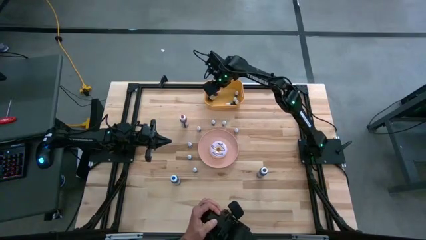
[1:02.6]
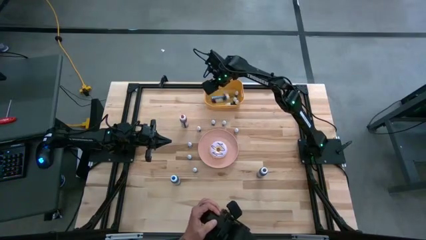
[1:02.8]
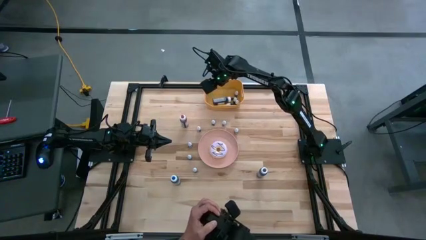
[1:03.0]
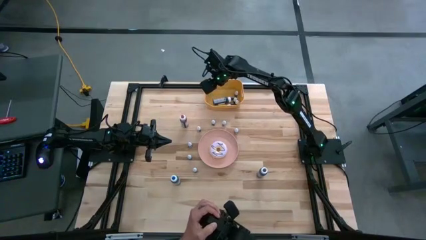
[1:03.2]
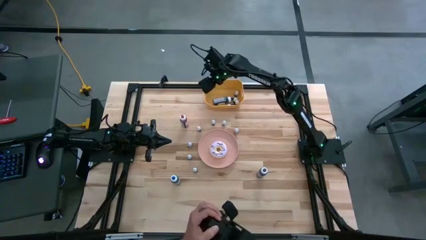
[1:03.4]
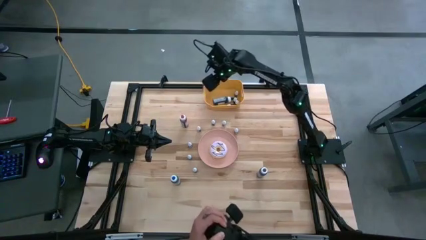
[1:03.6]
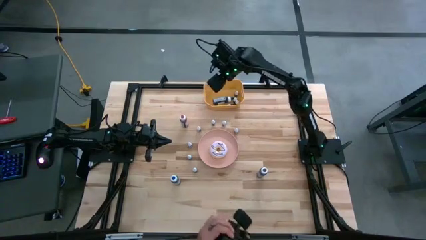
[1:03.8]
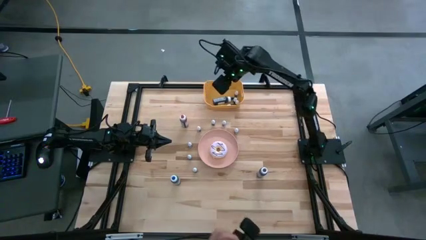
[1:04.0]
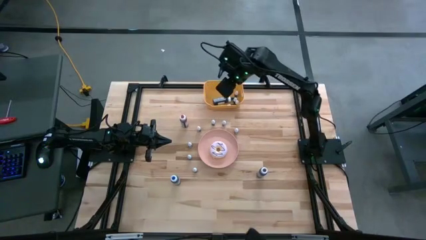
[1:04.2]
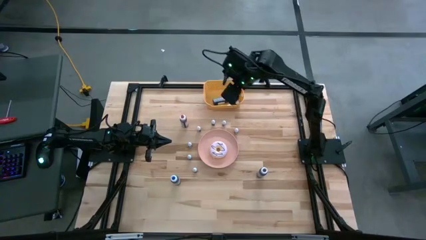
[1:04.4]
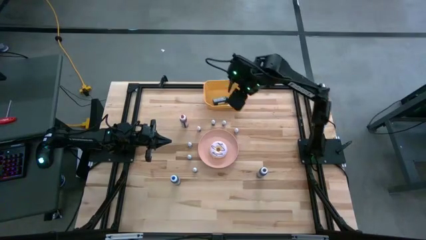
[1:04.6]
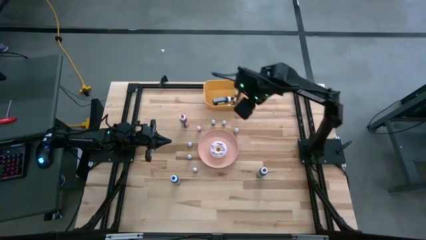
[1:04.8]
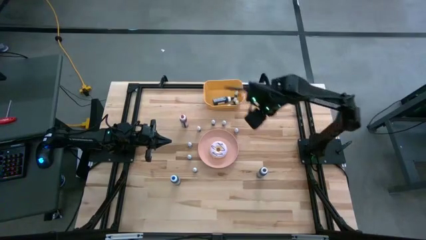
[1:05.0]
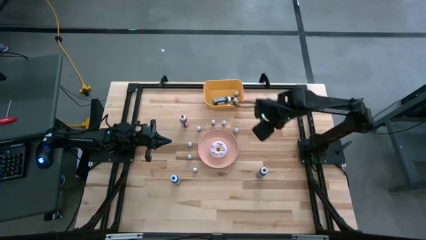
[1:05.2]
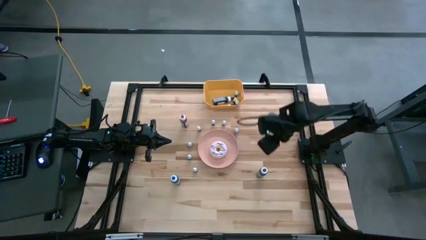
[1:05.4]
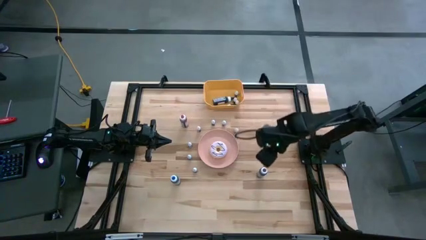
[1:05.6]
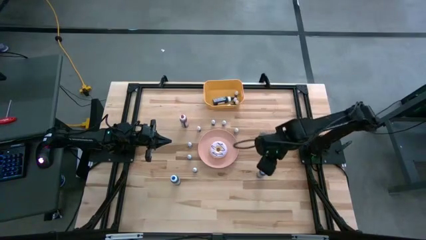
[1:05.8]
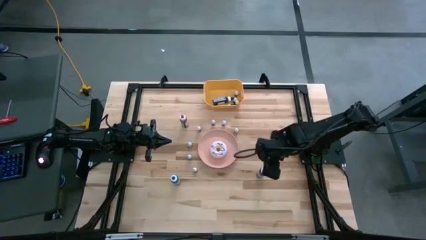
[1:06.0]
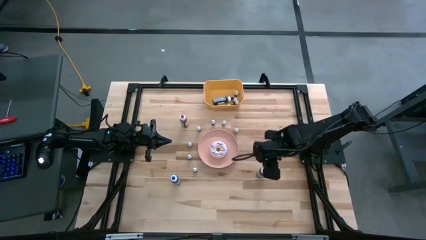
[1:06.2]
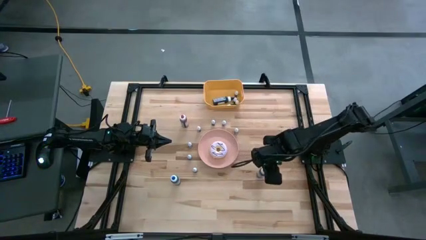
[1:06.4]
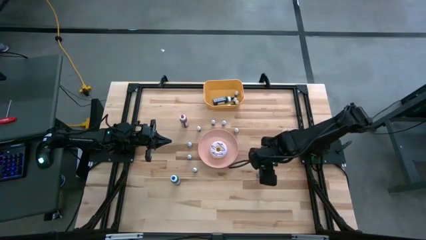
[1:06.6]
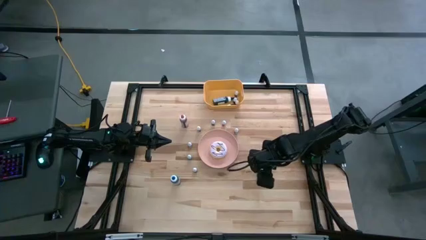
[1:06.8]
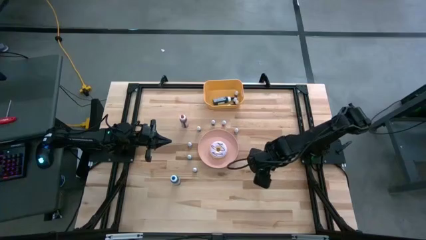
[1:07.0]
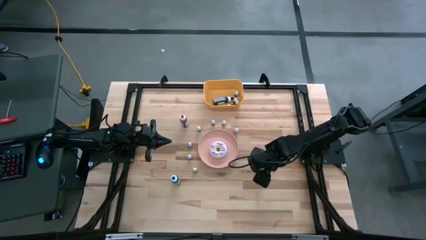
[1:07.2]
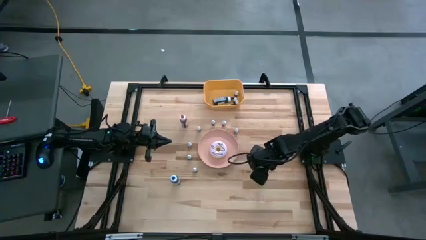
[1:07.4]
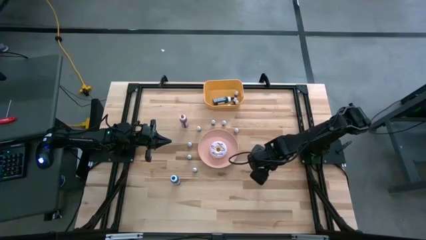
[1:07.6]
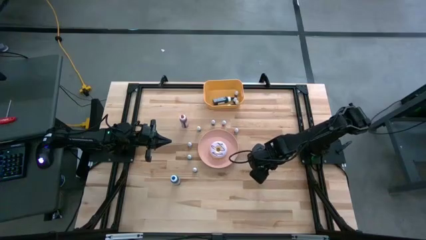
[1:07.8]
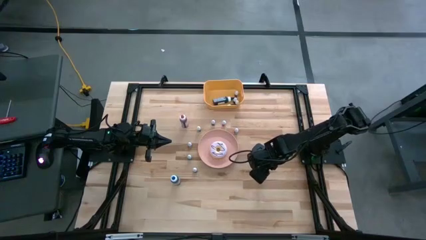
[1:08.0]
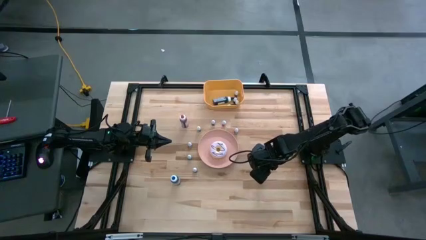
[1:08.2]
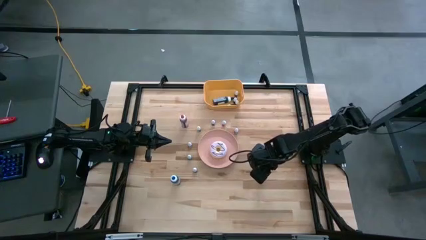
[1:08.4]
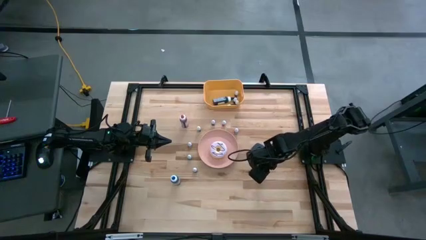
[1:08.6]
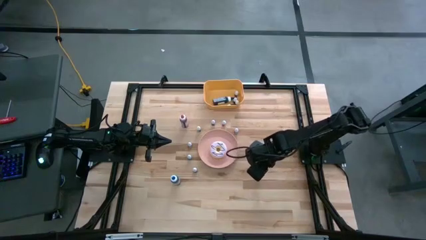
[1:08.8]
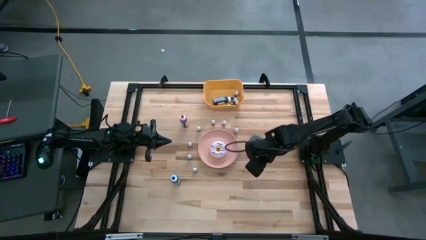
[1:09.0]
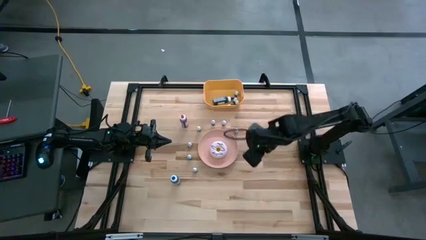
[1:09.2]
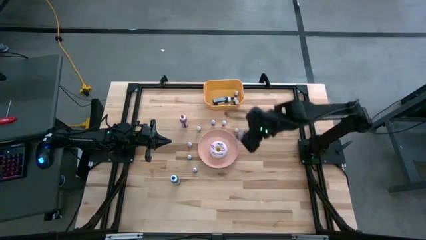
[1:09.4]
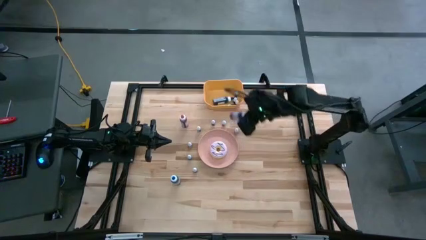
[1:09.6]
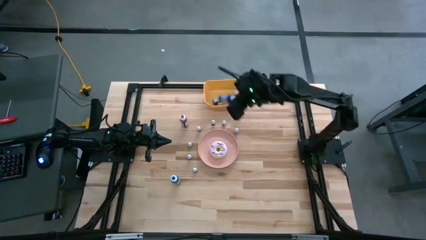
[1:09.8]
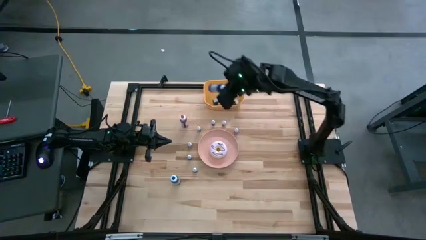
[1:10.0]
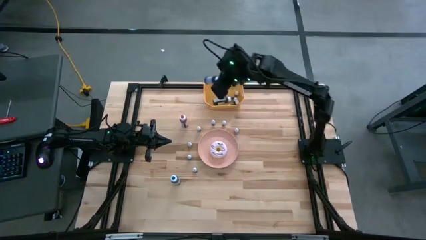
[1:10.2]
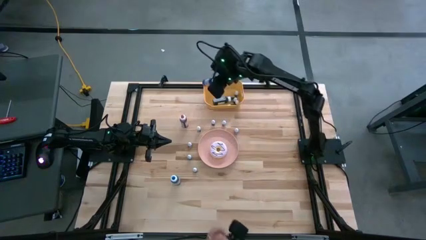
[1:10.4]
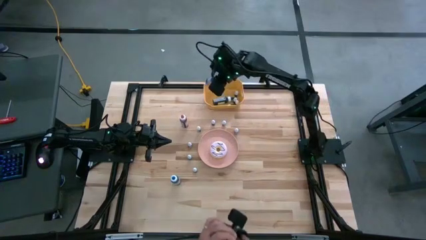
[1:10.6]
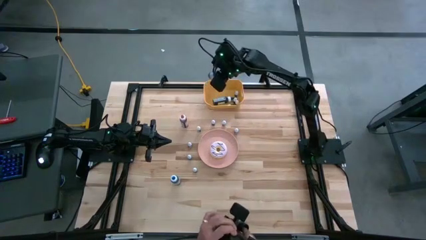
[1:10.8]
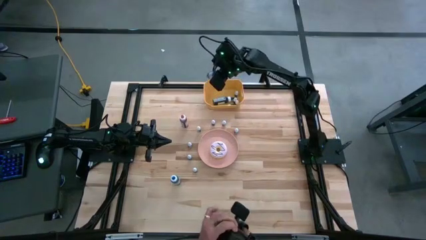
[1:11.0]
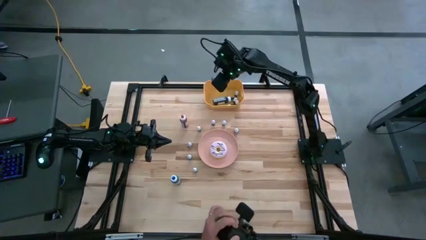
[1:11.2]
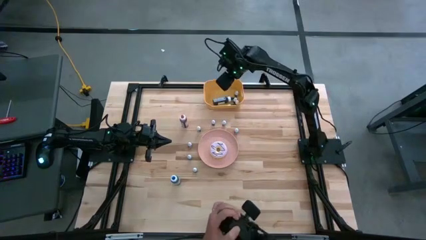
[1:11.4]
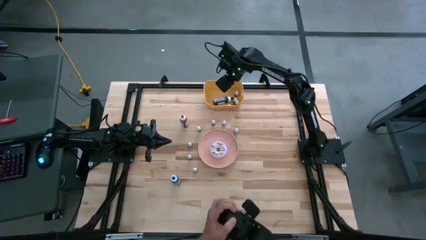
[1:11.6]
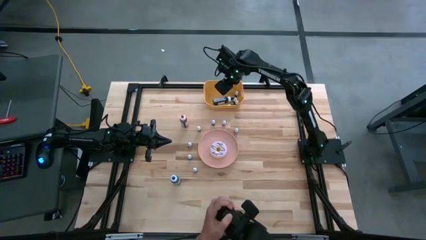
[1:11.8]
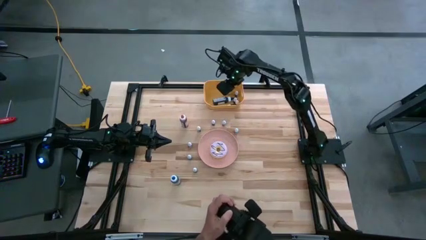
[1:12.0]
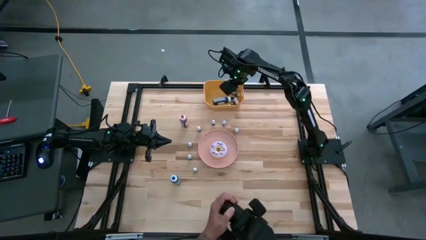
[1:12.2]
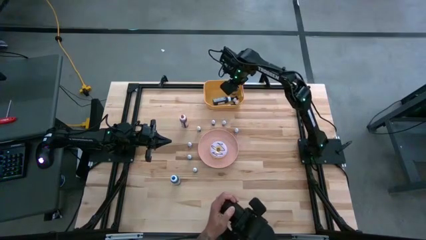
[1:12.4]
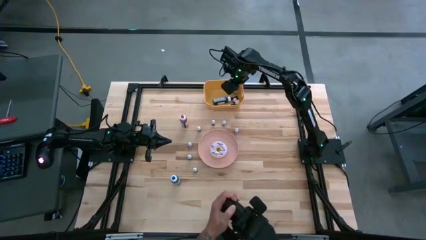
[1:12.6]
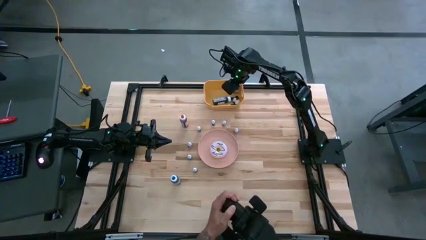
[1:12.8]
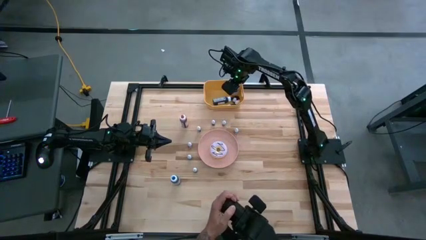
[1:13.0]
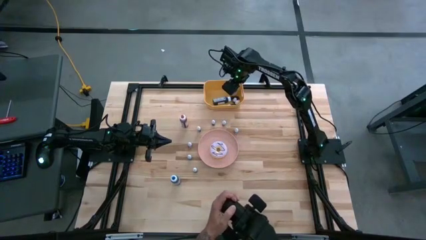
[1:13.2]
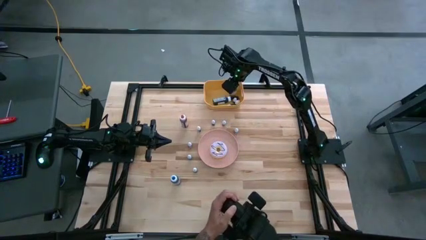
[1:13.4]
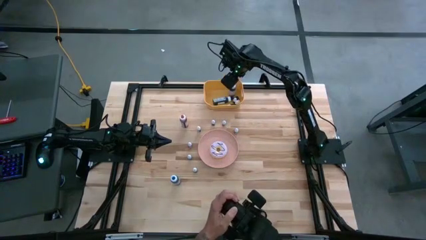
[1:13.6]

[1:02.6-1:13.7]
Task: Pick & Place food coloring
Put the large purple food coloring bottle into the orange bin

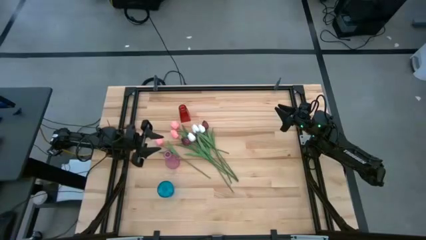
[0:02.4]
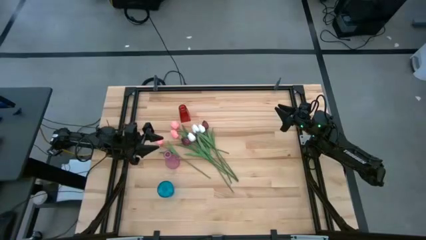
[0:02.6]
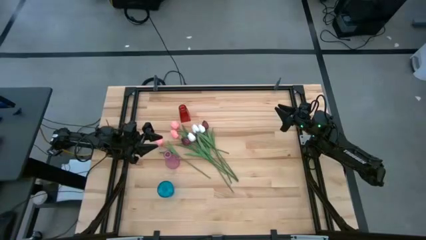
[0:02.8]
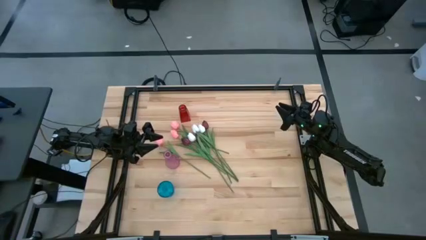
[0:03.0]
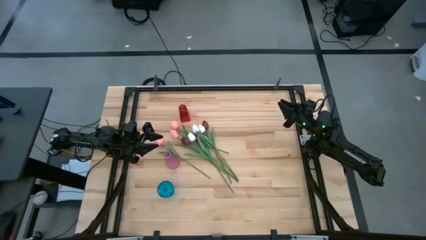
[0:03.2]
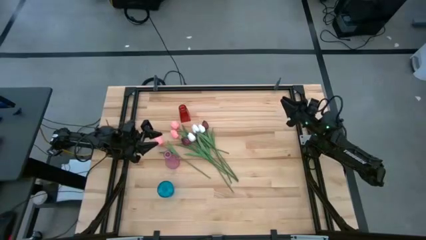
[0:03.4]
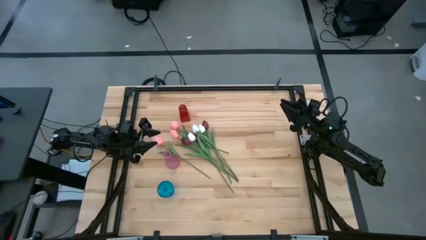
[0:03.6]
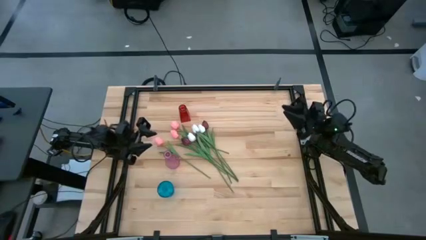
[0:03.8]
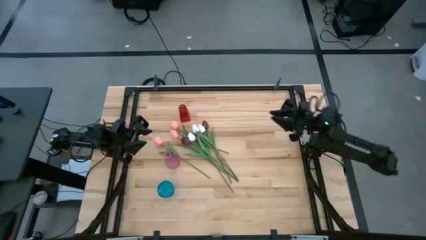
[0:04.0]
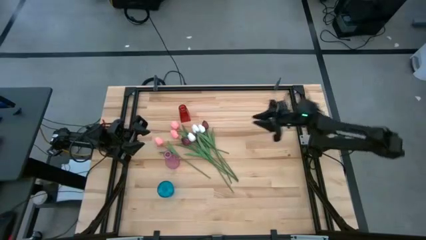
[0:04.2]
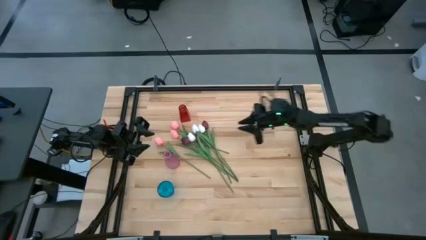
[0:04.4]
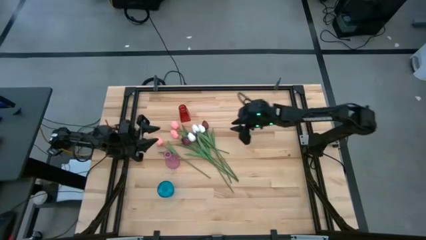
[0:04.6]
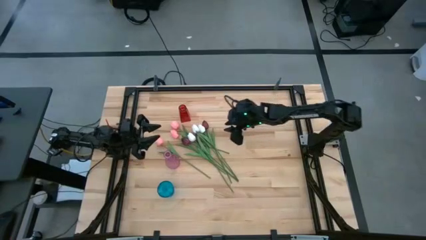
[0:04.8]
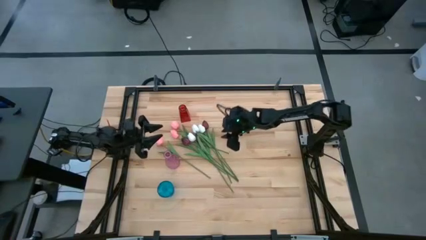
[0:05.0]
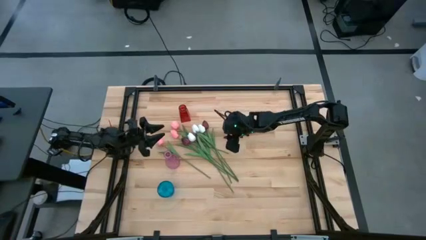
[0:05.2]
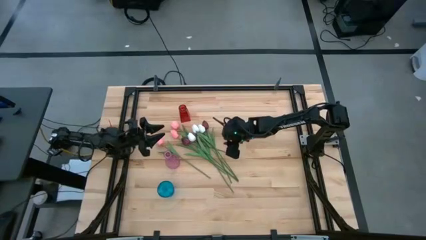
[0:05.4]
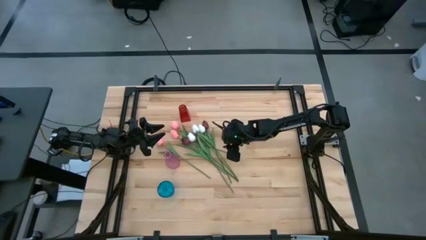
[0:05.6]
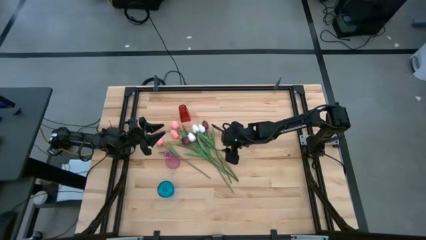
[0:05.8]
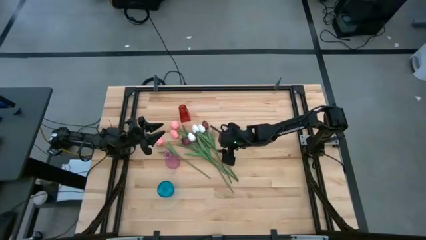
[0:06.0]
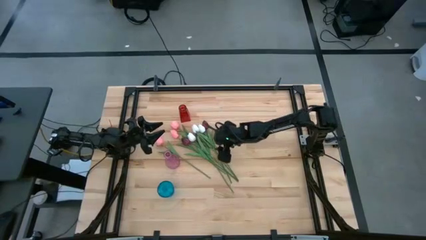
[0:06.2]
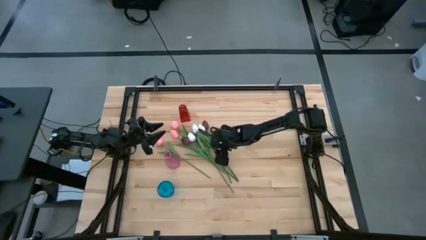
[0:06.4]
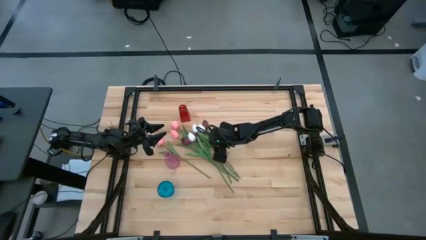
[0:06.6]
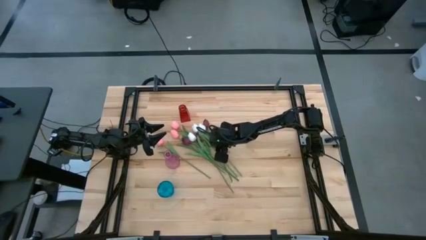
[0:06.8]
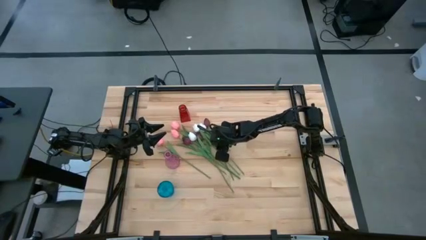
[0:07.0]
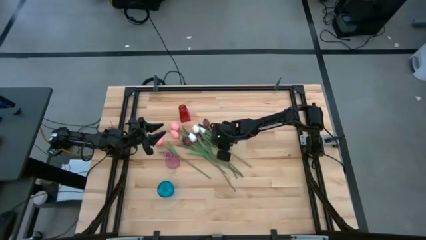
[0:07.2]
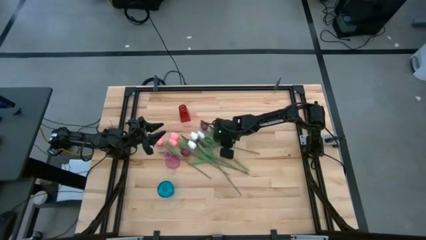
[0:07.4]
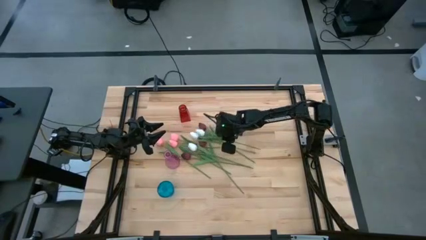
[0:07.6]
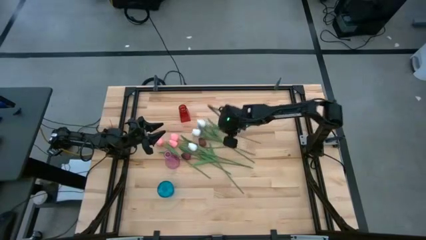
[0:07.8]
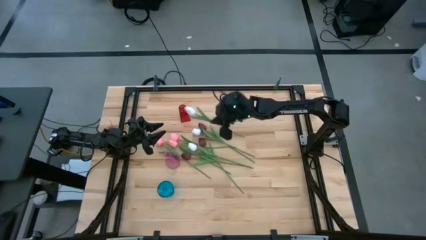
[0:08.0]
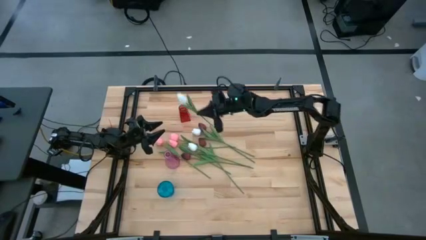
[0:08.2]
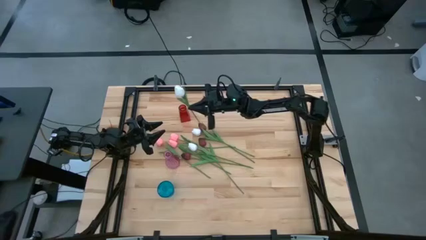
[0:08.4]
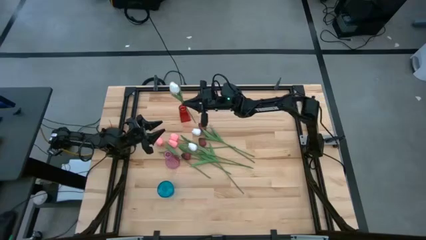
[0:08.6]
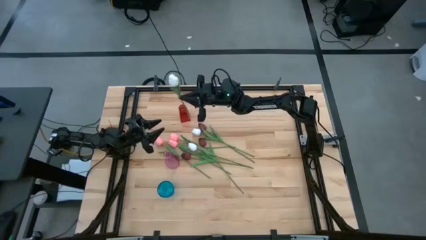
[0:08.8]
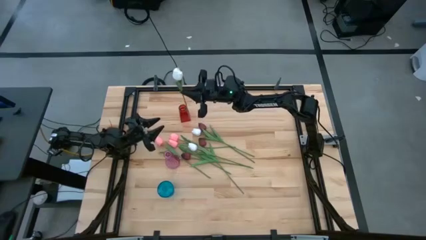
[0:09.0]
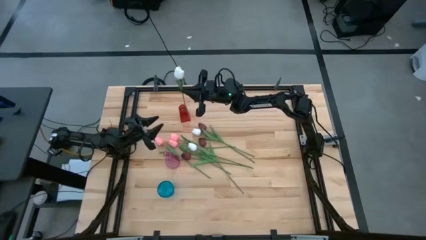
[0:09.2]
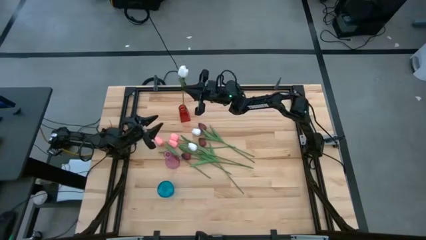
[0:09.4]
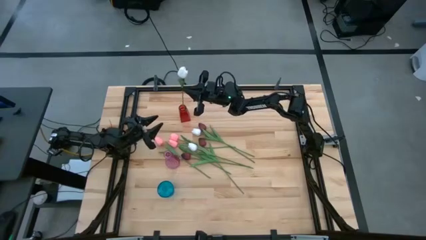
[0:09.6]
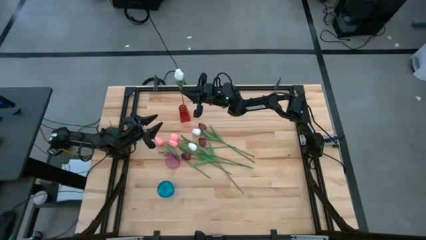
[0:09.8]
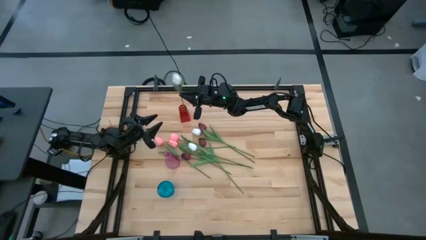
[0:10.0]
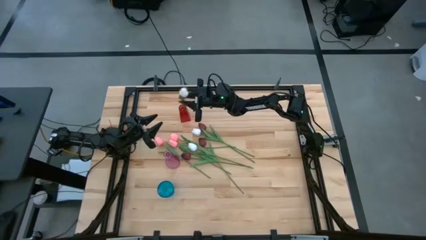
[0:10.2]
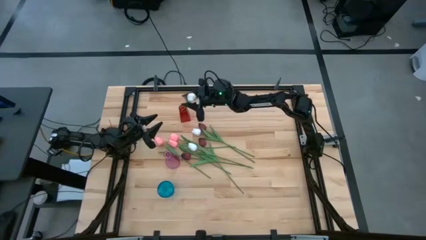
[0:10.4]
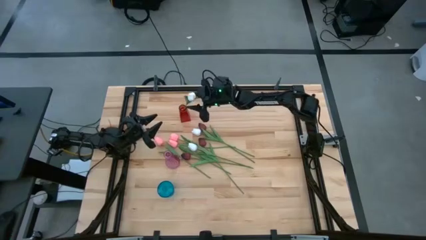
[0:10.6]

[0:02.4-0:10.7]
Task: Sort flowers into vase by color
Put the right white tulip into the red vase
